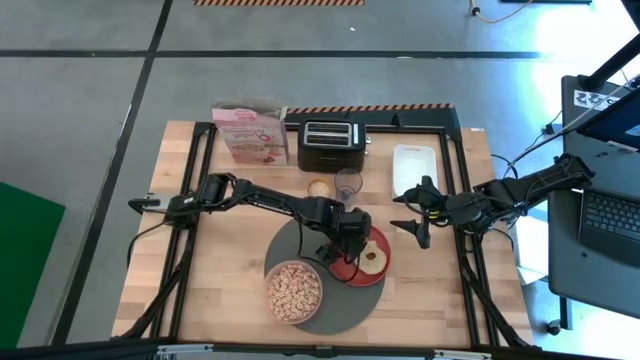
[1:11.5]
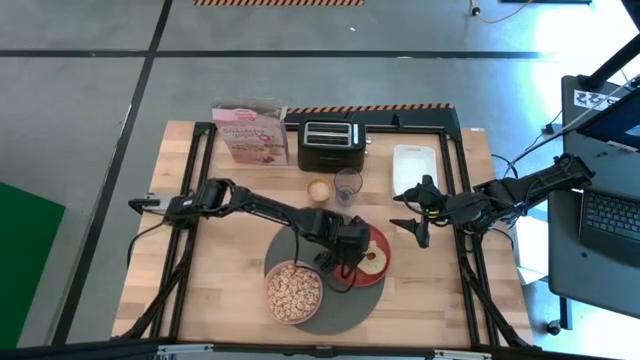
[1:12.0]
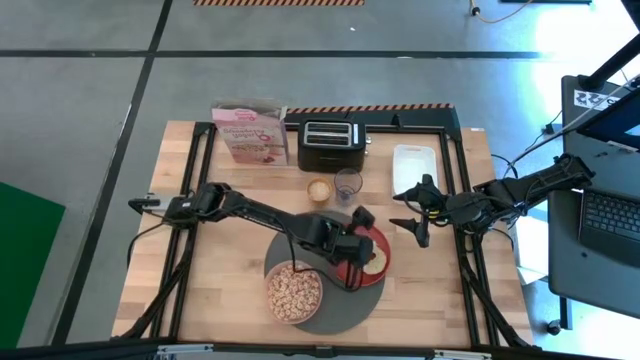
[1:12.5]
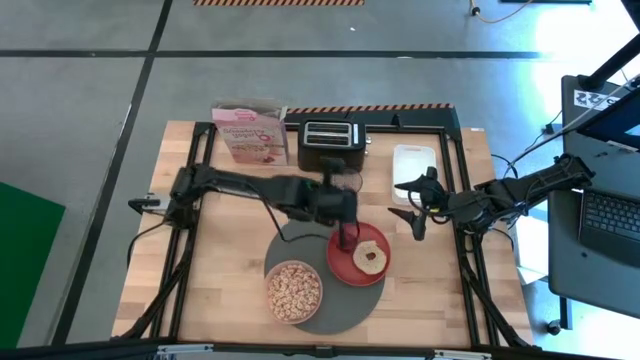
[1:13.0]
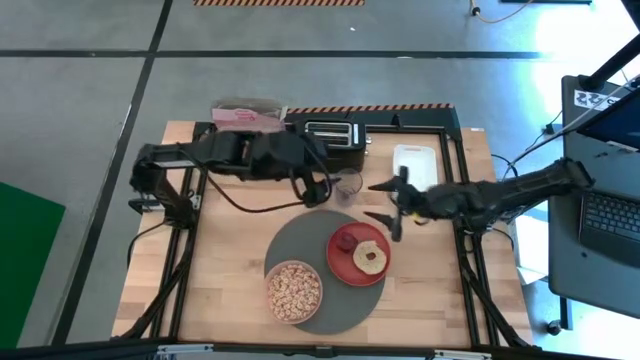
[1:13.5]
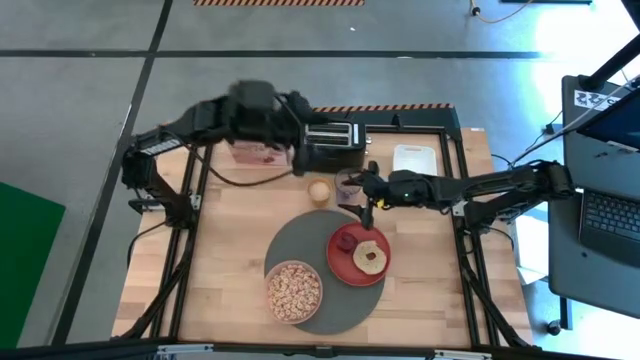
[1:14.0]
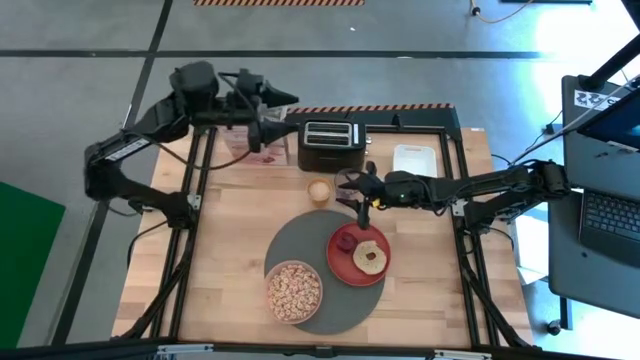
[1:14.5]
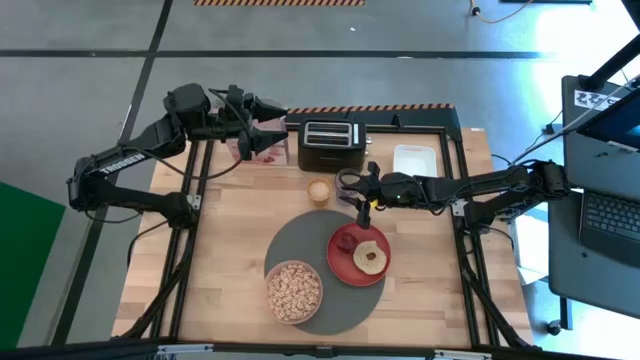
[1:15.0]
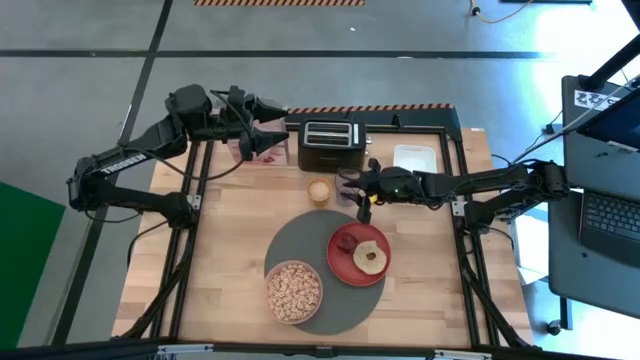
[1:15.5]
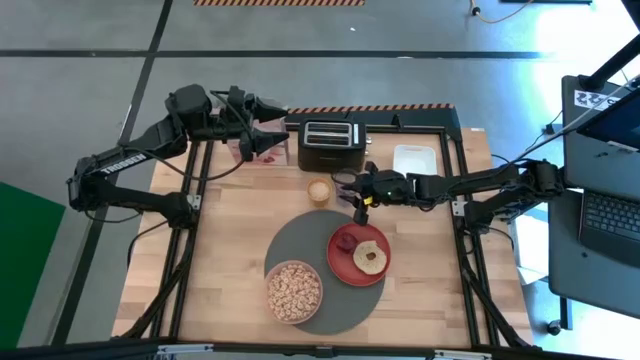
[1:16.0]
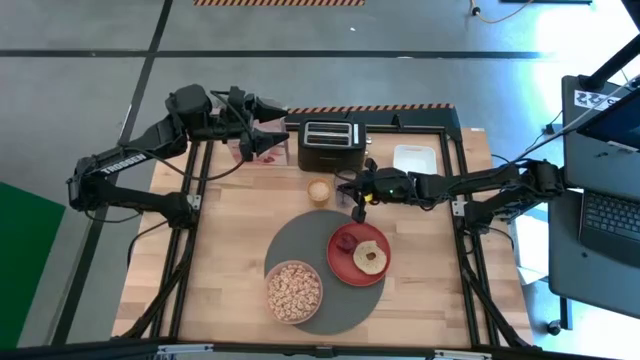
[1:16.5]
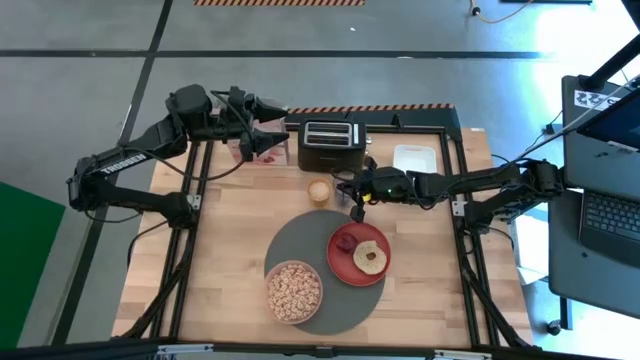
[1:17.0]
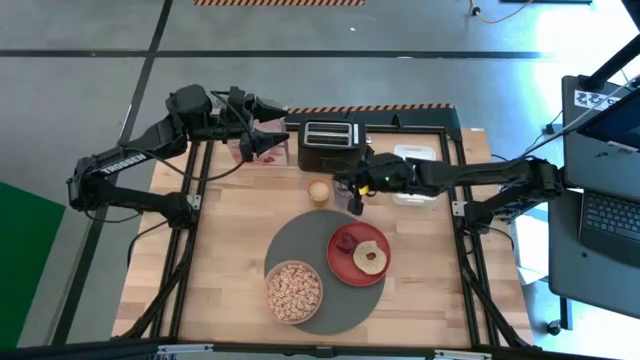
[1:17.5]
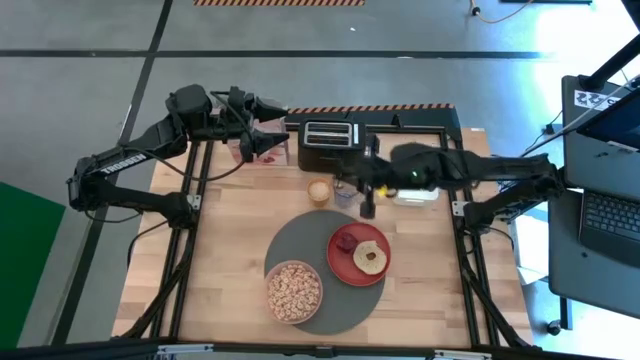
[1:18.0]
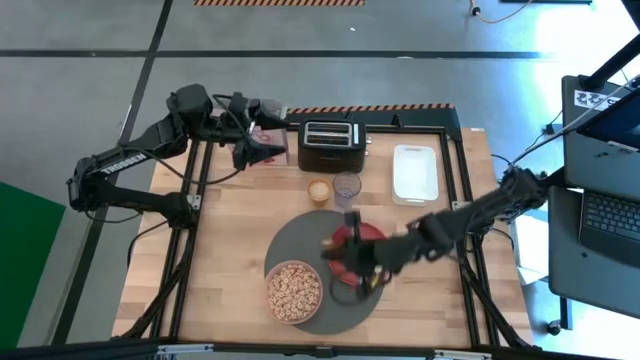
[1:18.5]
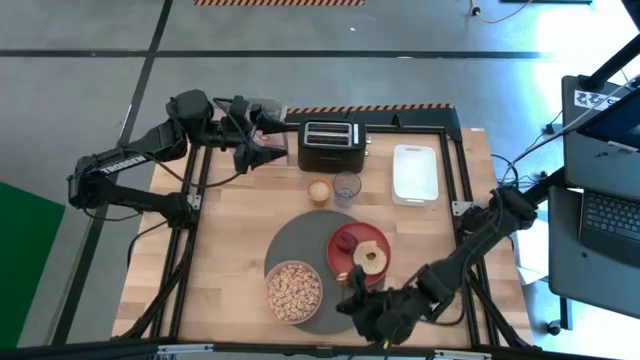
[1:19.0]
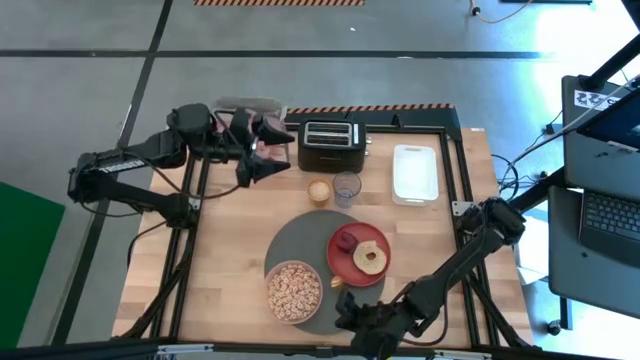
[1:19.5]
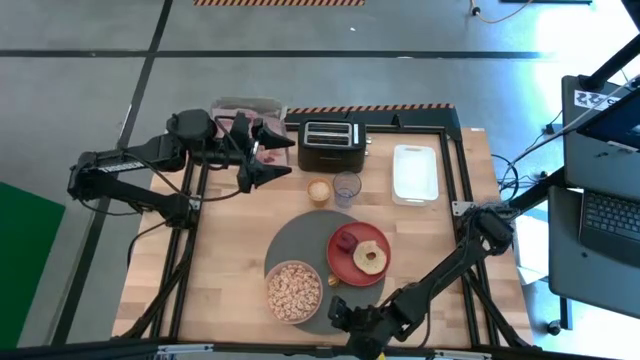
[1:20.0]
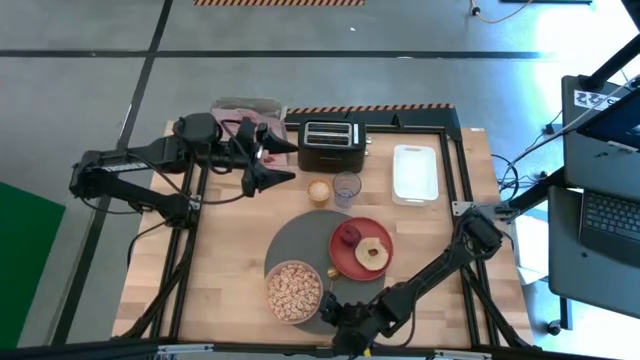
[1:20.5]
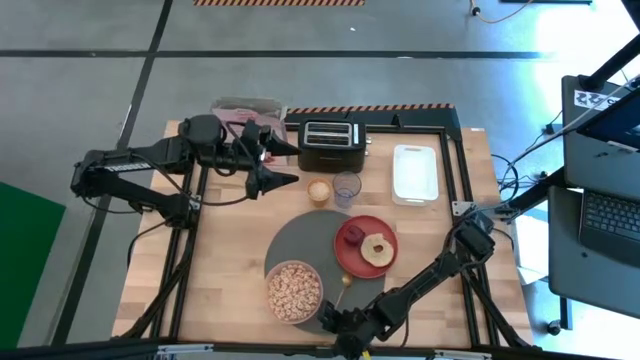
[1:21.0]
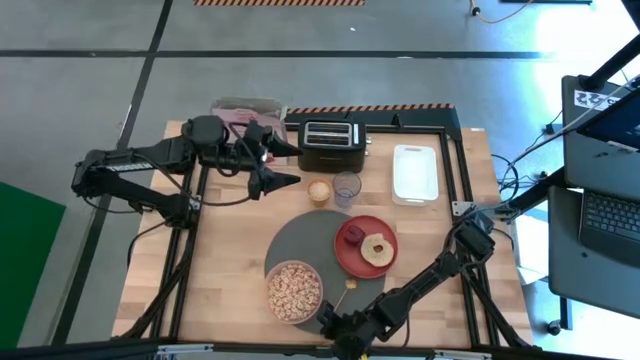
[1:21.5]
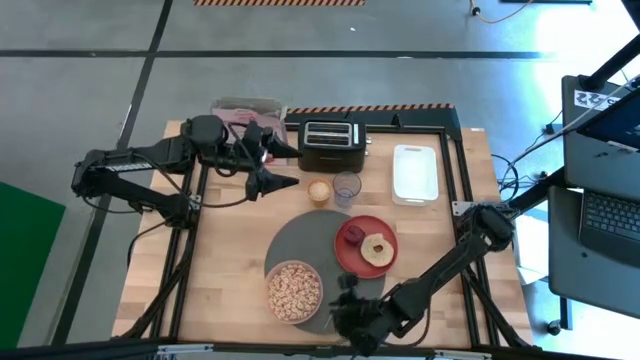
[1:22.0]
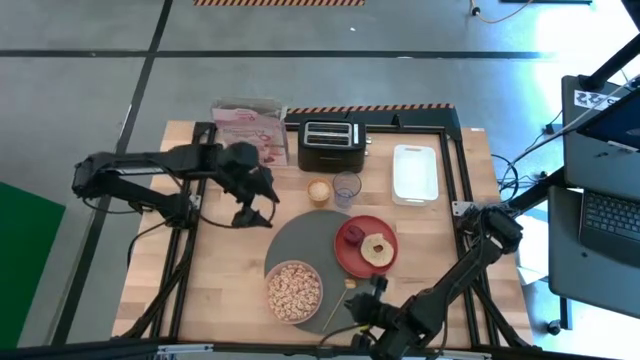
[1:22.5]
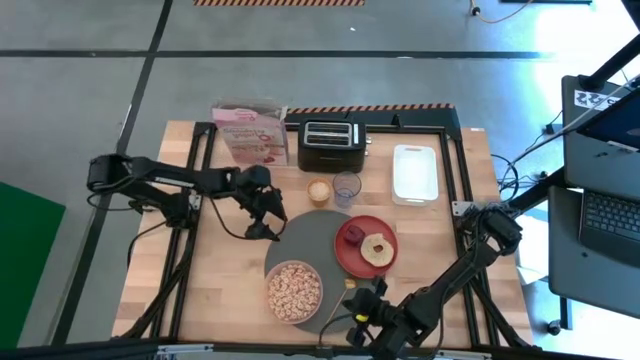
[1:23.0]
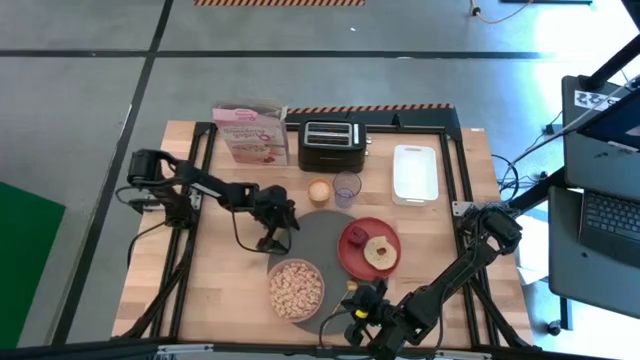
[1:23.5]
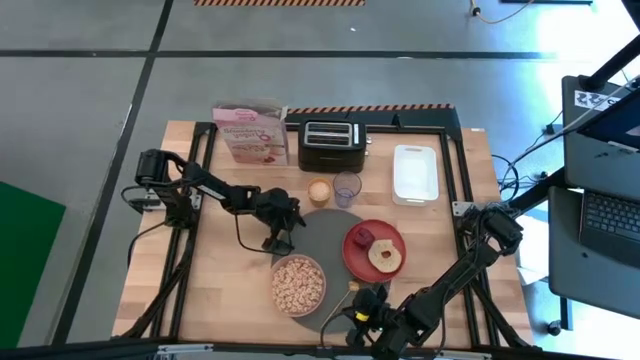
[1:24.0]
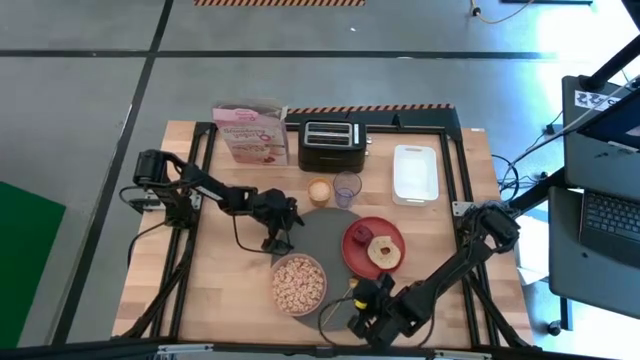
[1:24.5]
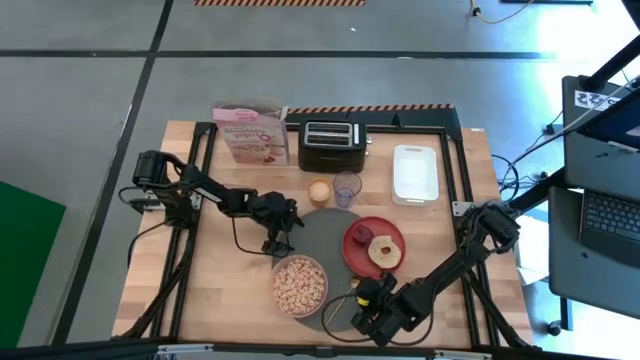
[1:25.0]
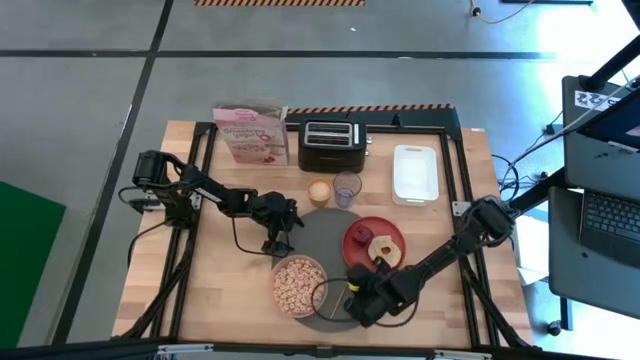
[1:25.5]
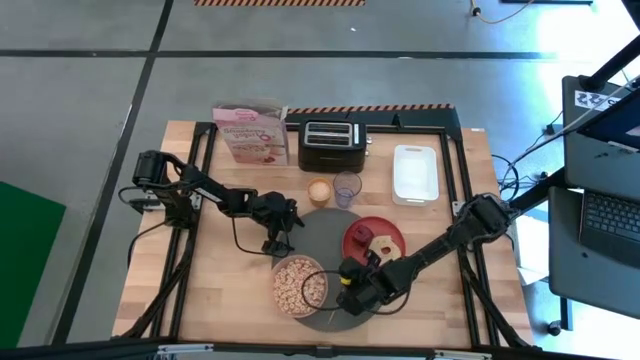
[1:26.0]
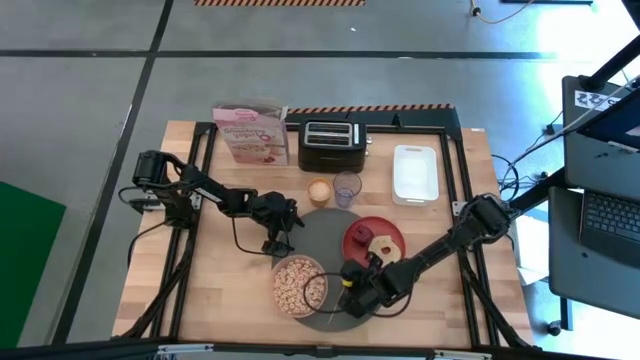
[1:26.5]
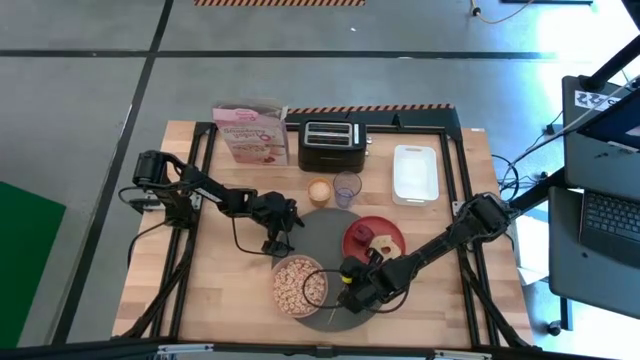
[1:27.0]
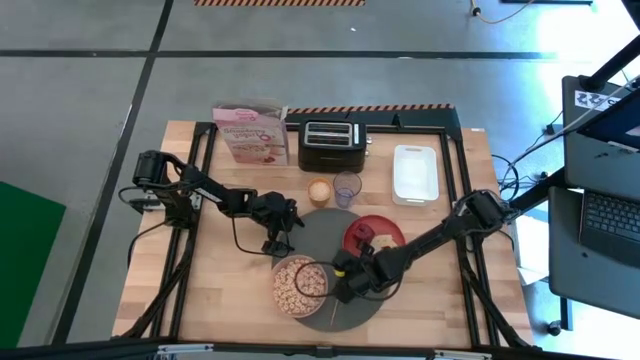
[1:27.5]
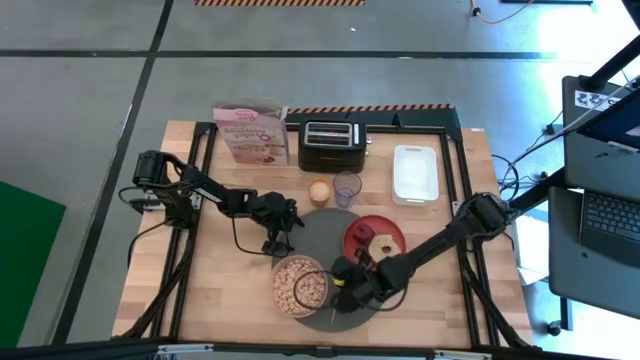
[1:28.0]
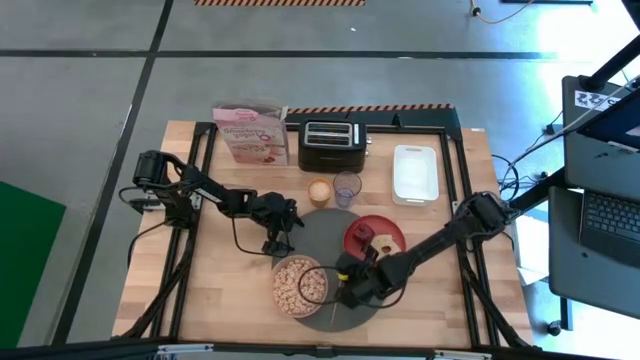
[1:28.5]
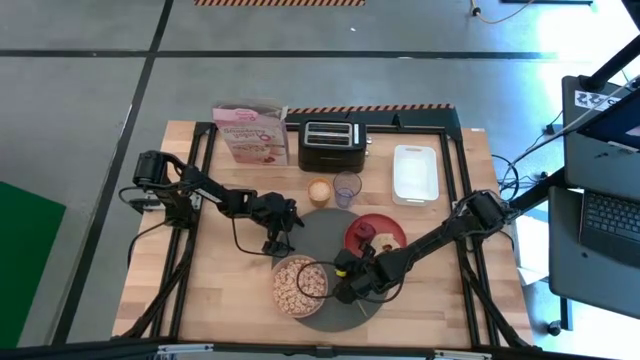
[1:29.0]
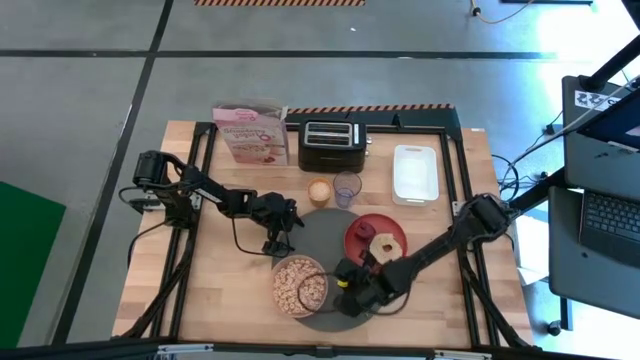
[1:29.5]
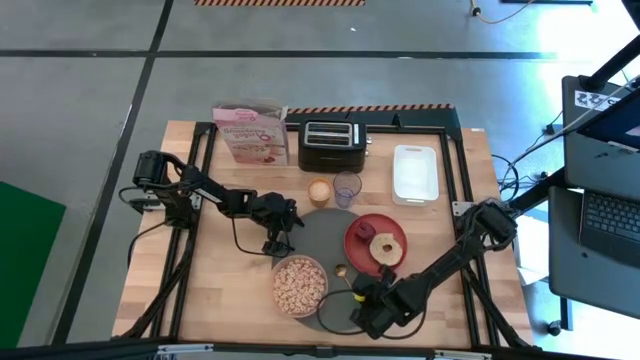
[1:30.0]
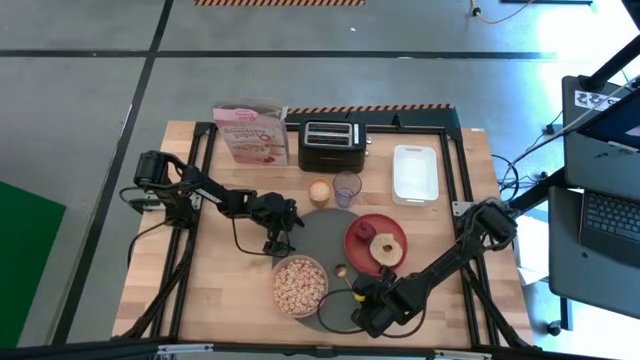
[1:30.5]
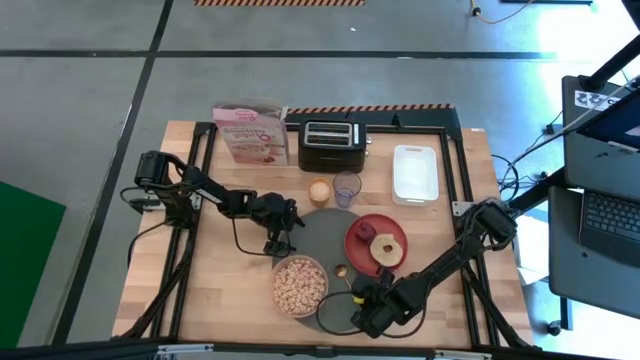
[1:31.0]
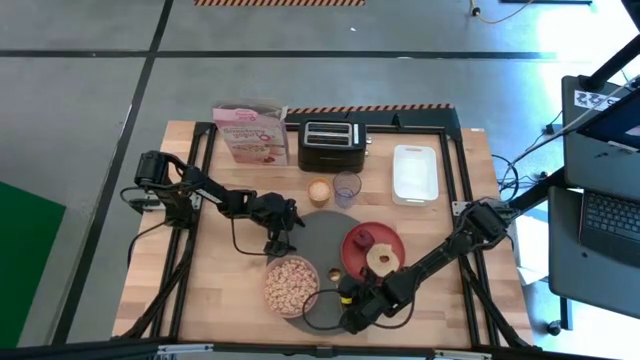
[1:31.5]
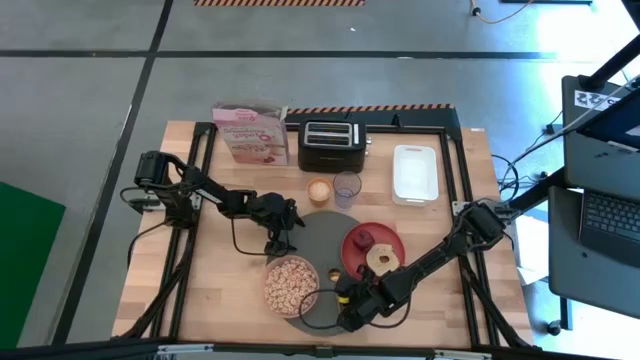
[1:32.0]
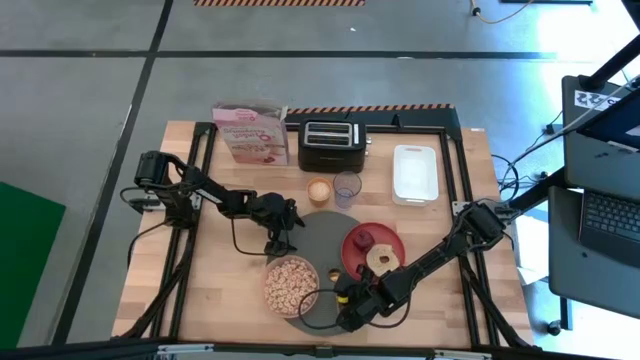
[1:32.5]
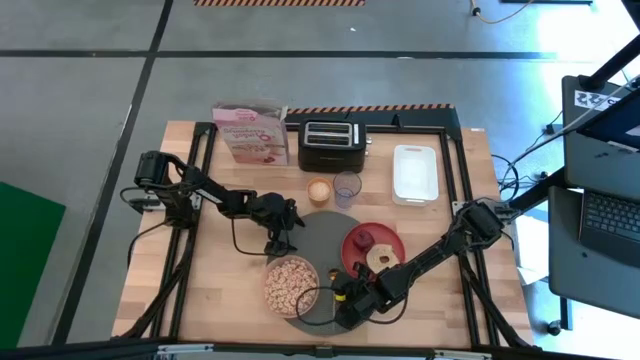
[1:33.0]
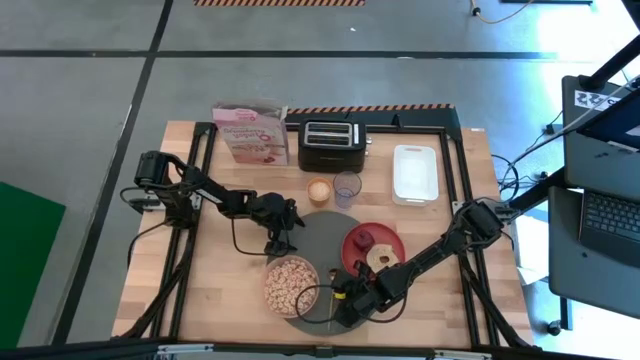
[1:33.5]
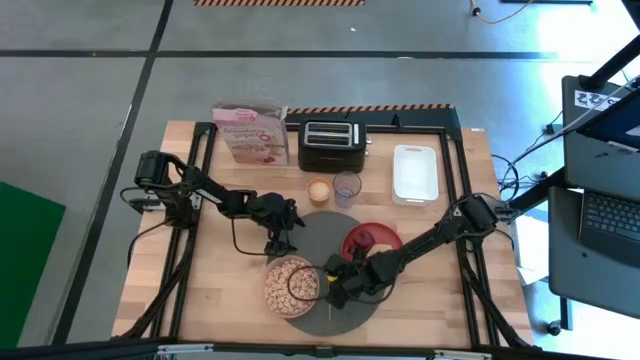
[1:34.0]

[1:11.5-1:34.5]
Task: Arrange a breakfast setting
Put the spoon on the bottom right of the tablemat
